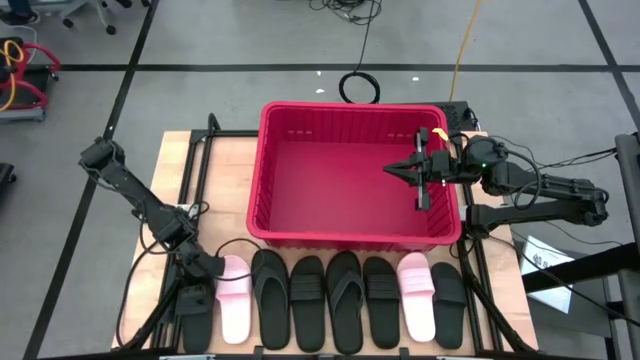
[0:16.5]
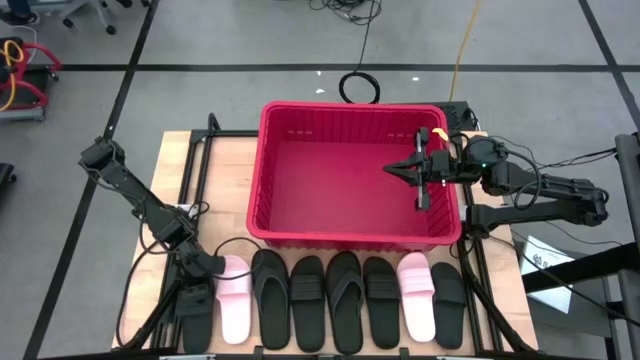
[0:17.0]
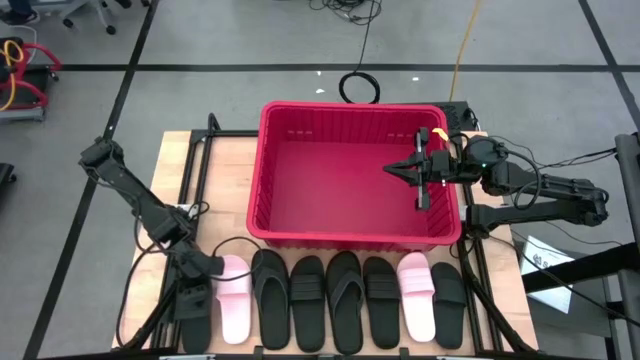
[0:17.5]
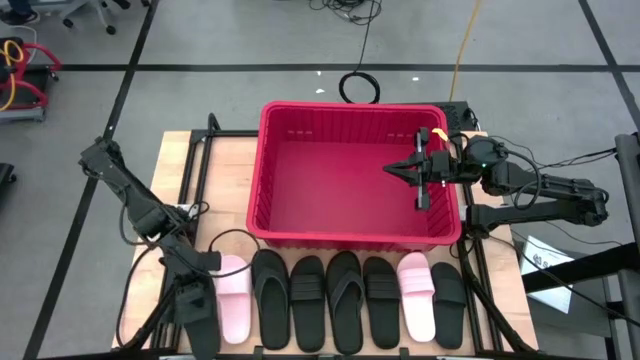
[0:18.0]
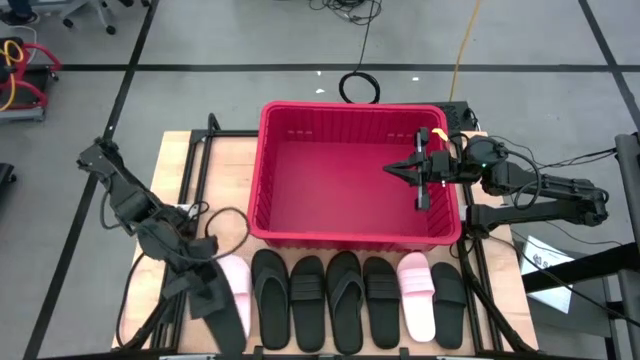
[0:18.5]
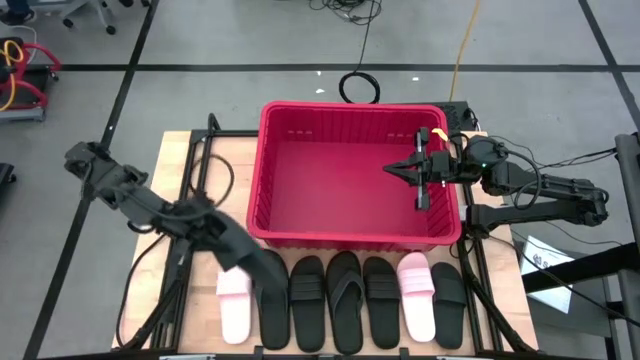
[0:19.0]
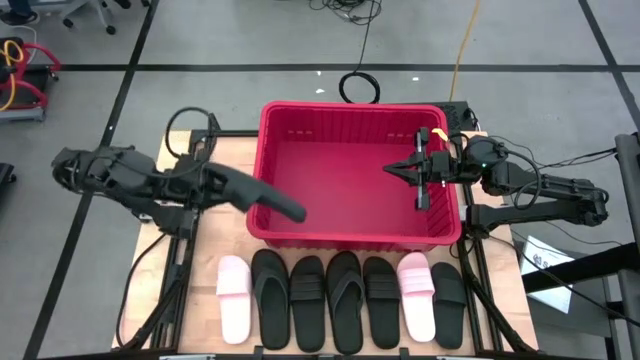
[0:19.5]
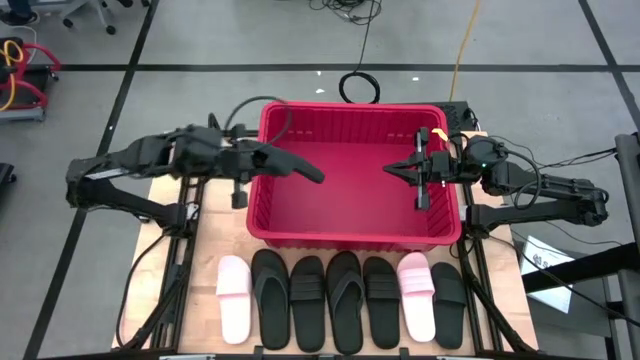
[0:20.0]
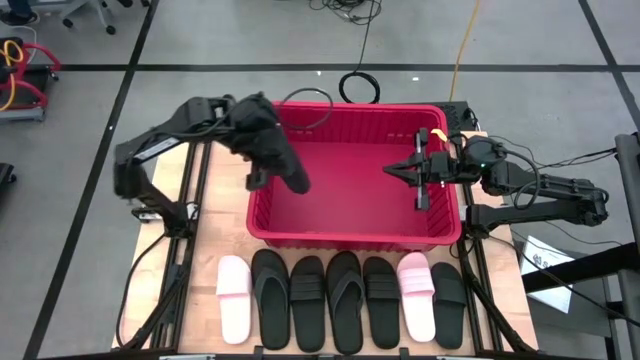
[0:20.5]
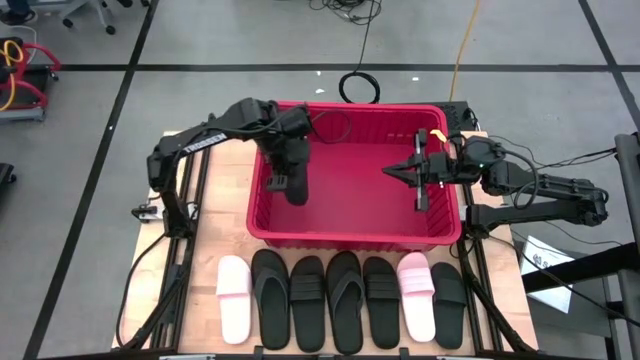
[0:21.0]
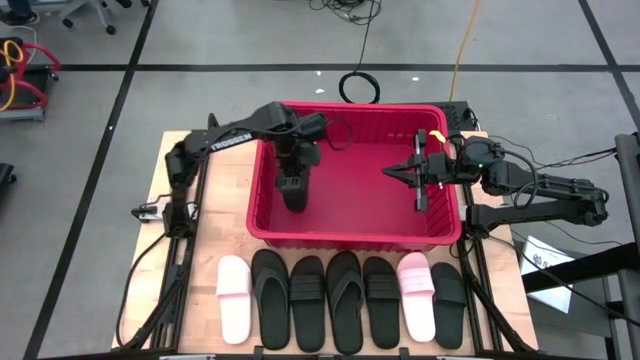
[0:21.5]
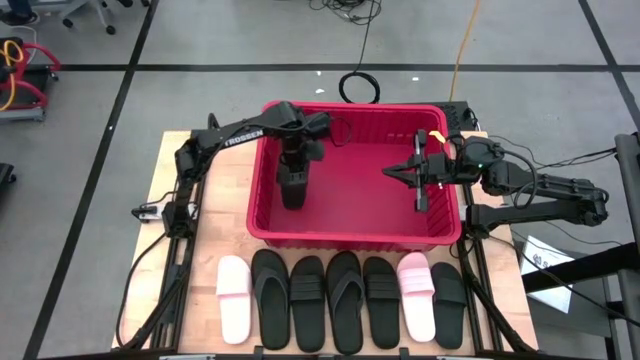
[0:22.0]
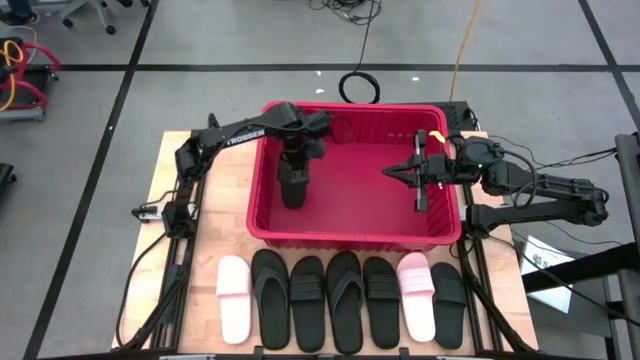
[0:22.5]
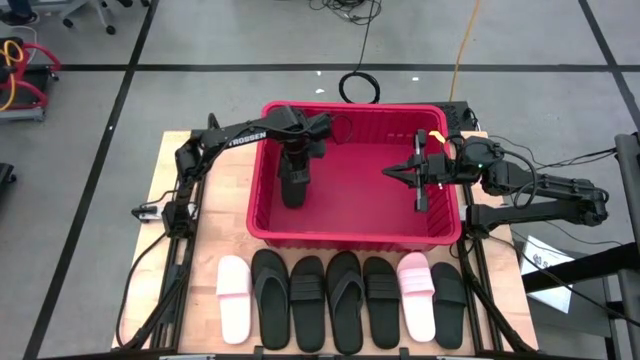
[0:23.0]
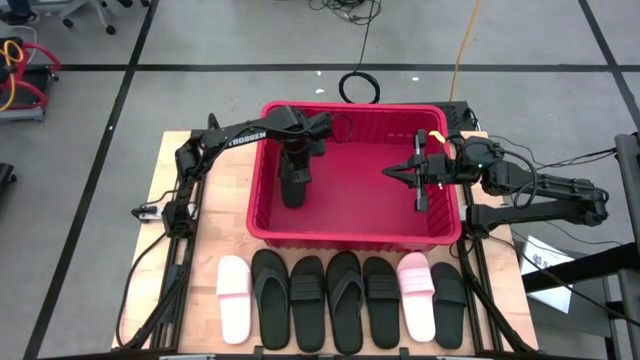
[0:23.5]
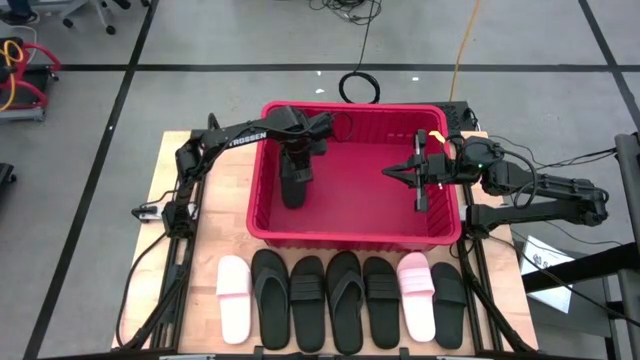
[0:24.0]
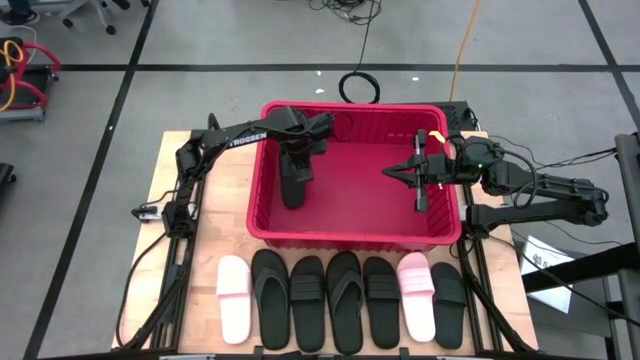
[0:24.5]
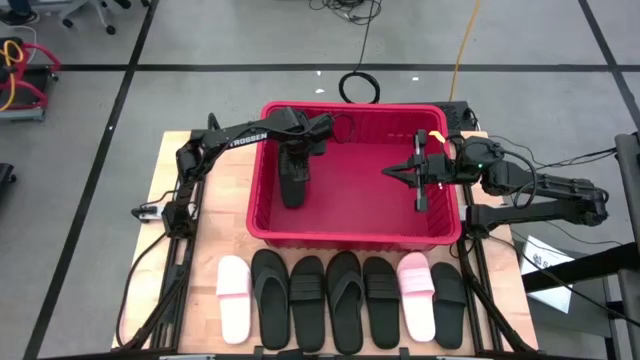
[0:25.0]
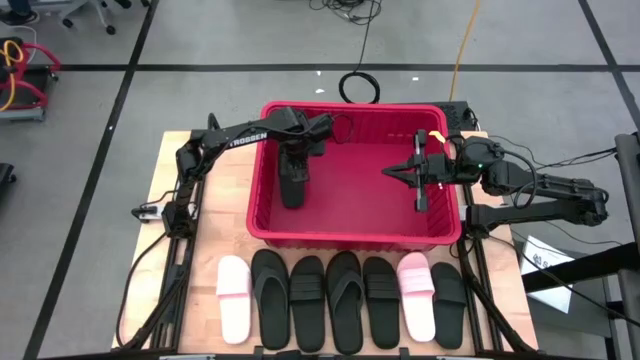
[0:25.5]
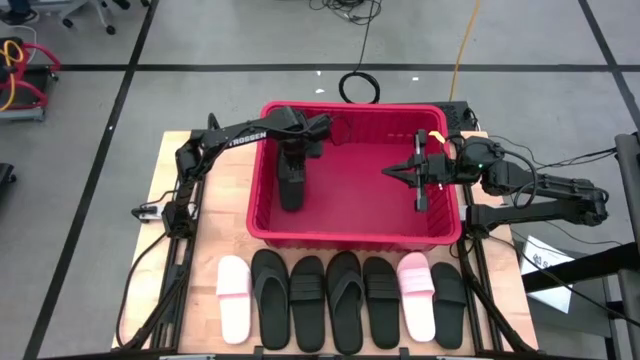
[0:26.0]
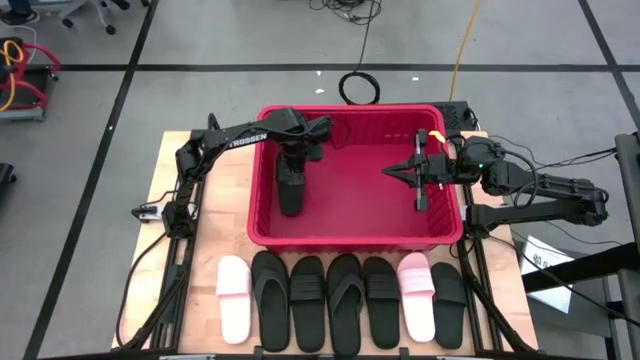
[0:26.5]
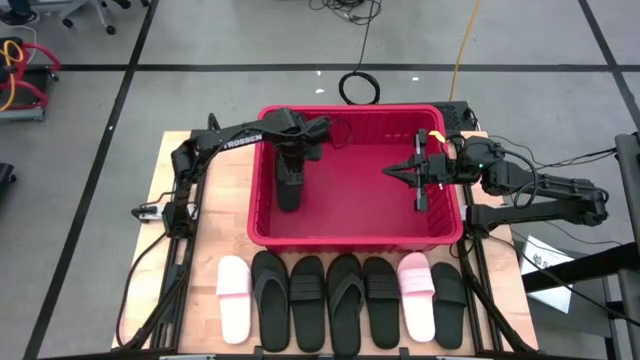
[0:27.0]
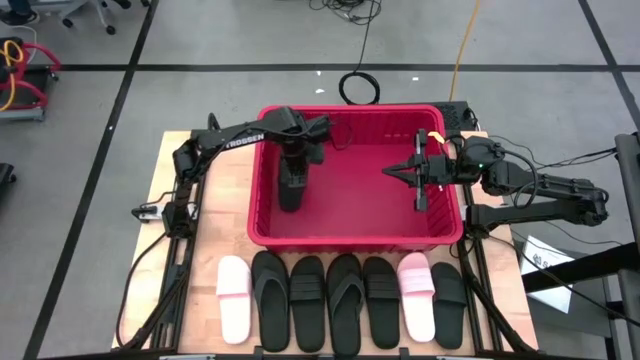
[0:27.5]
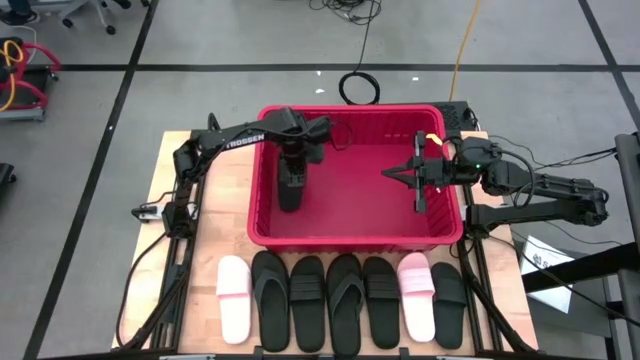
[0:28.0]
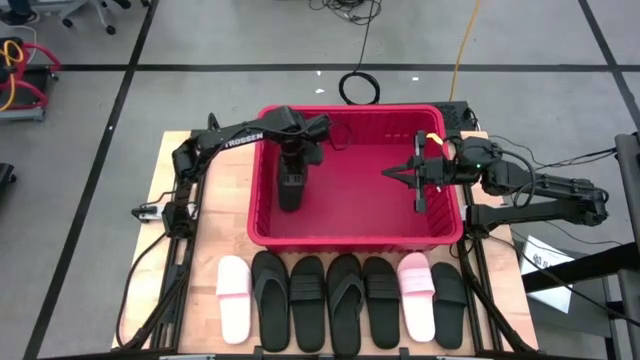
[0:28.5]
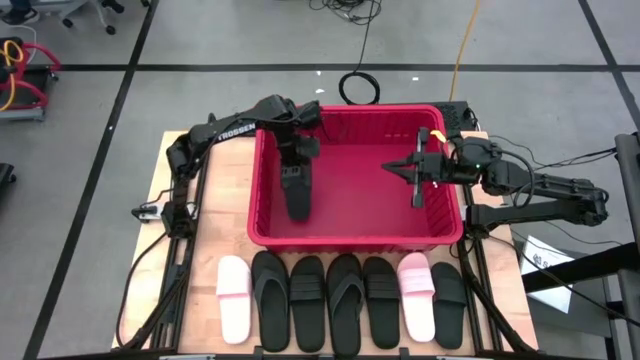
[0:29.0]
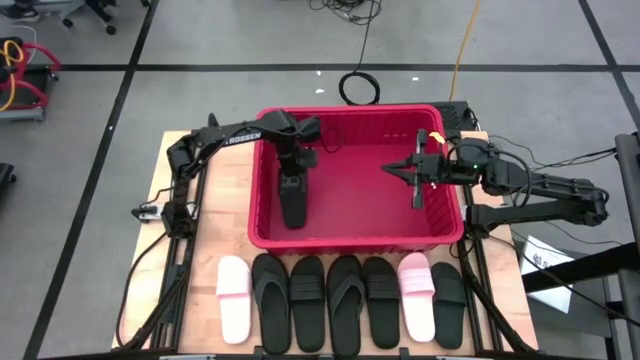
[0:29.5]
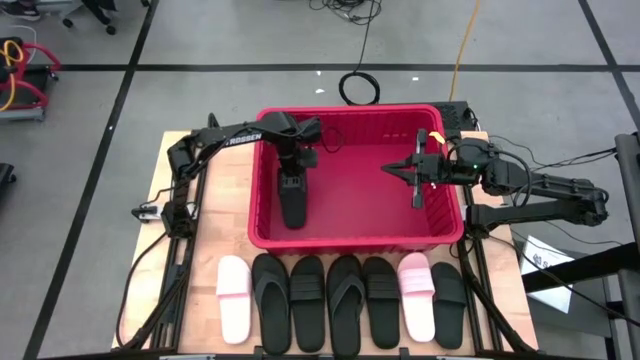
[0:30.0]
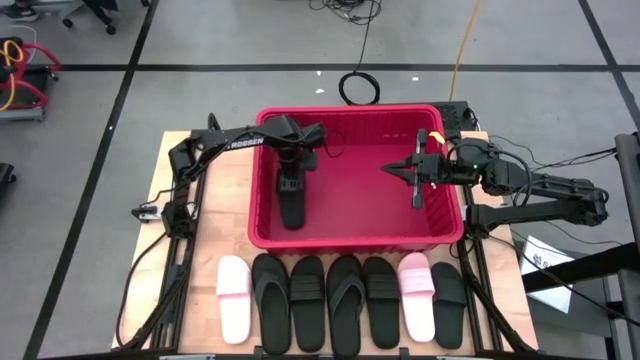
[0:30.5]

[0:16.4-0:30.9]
Task: Pick and place slides into bin
Put the black slide into the red bin

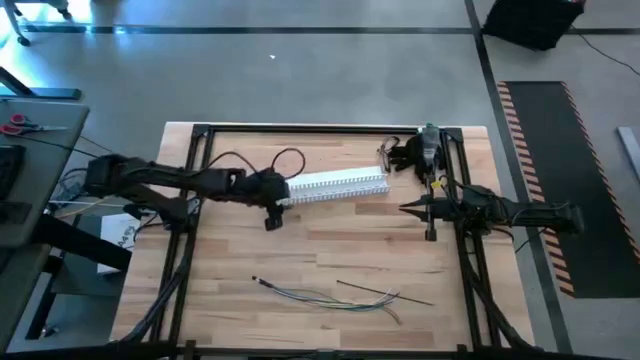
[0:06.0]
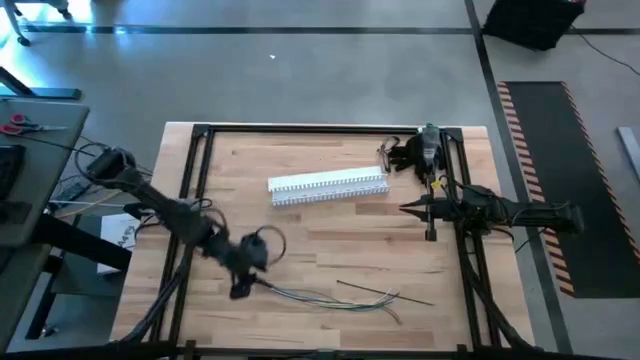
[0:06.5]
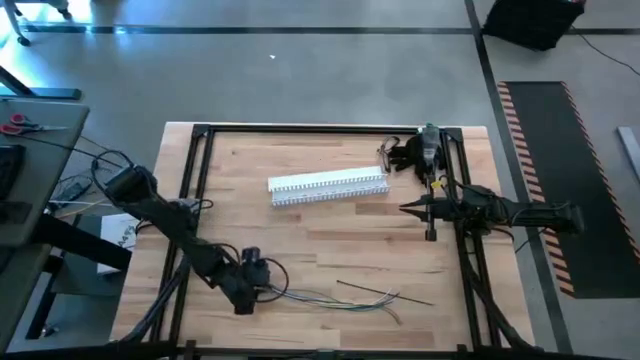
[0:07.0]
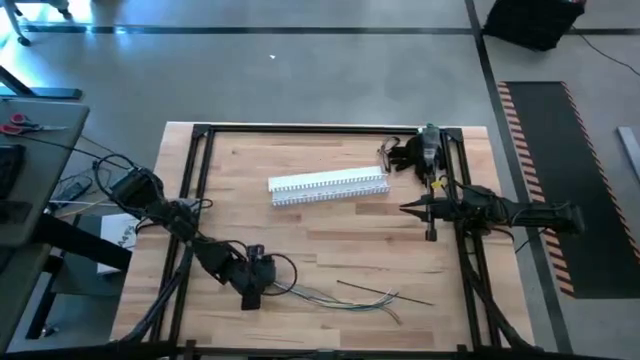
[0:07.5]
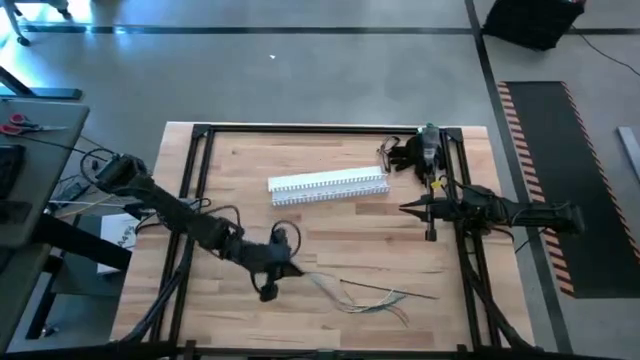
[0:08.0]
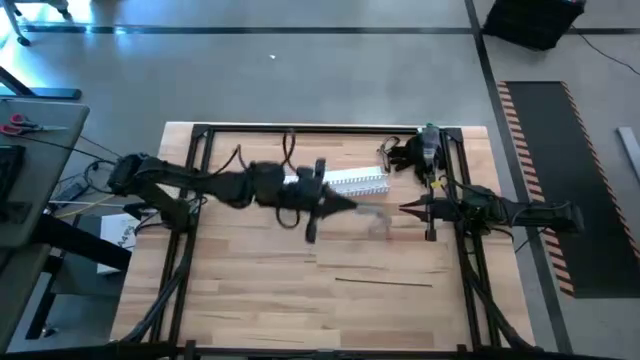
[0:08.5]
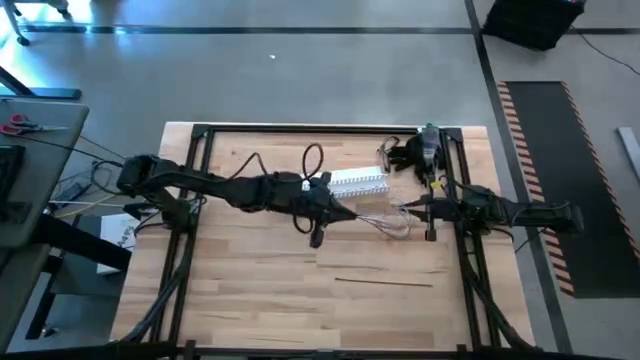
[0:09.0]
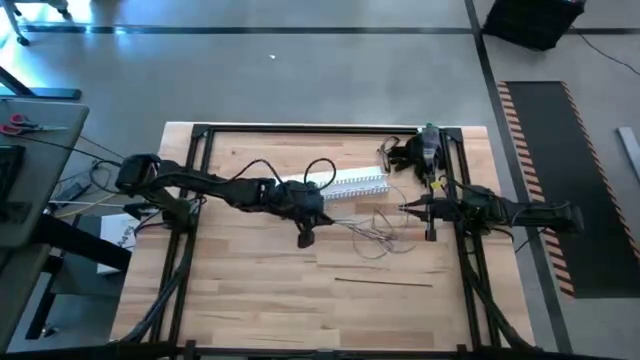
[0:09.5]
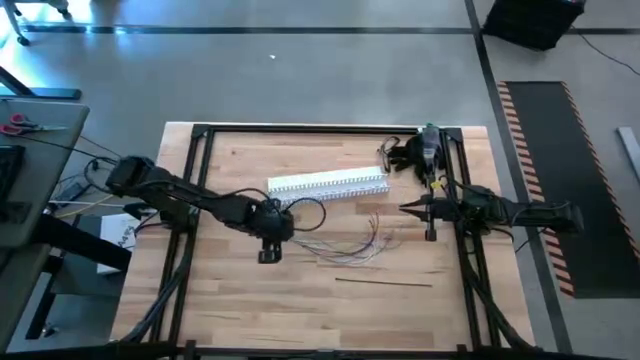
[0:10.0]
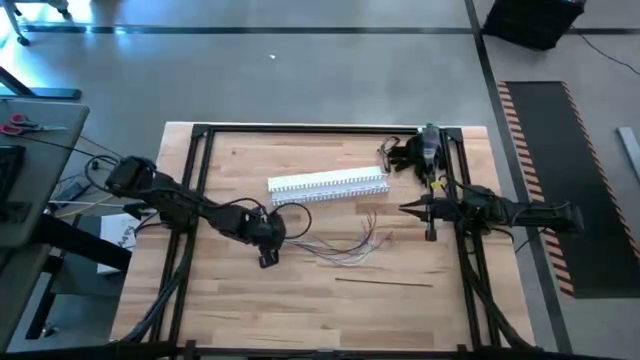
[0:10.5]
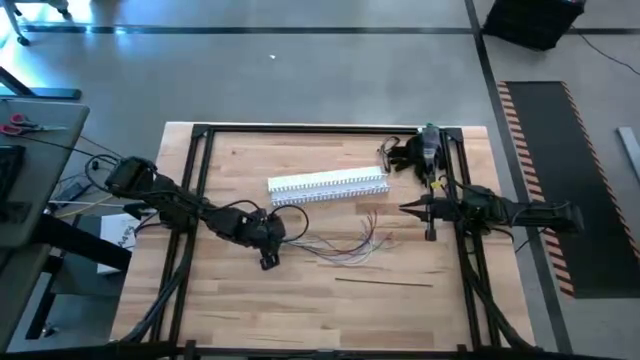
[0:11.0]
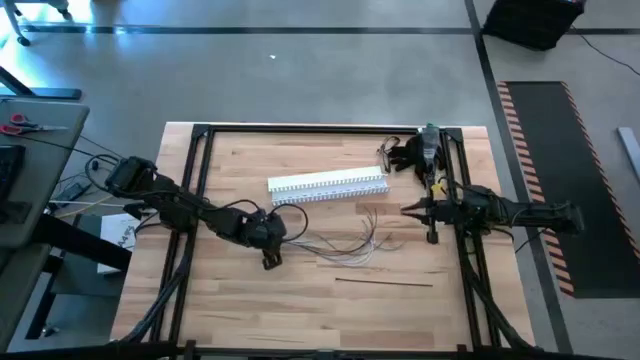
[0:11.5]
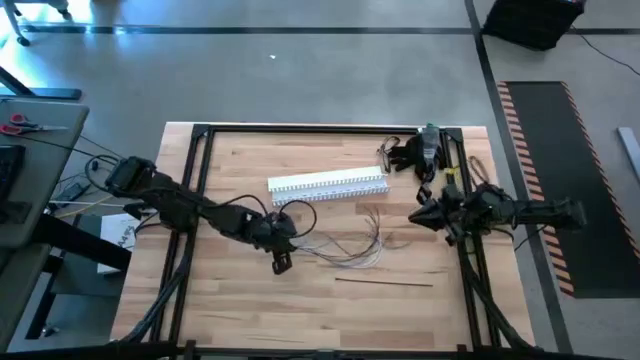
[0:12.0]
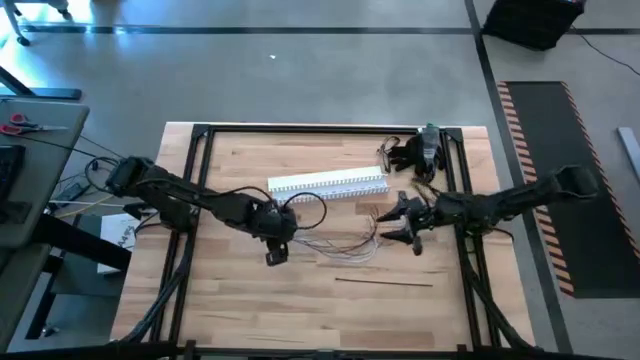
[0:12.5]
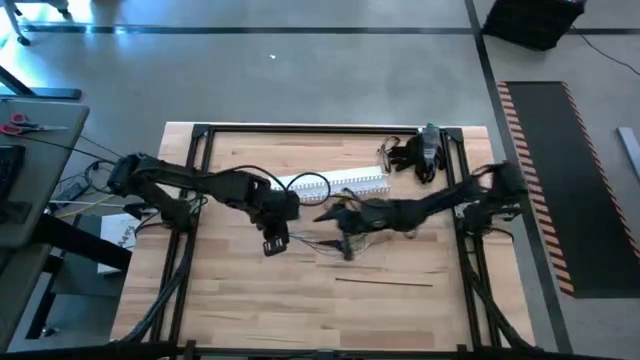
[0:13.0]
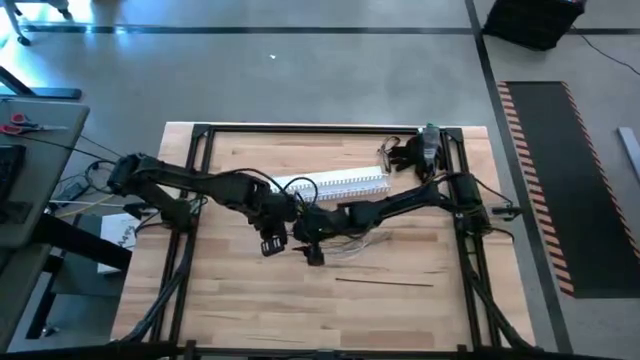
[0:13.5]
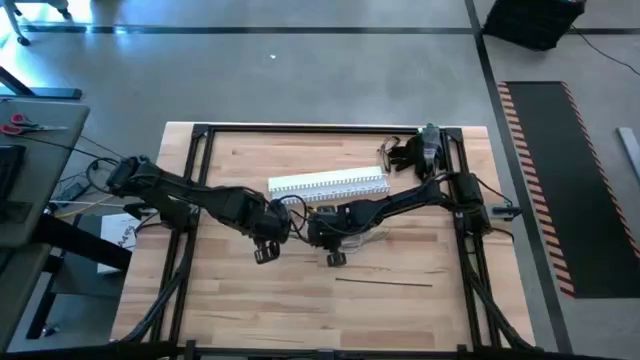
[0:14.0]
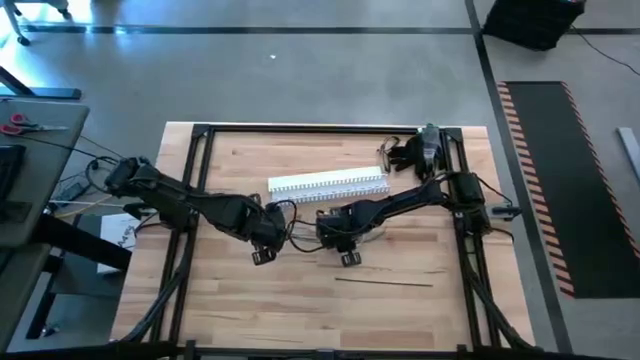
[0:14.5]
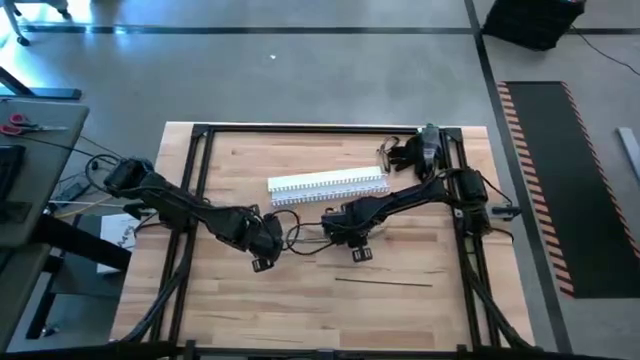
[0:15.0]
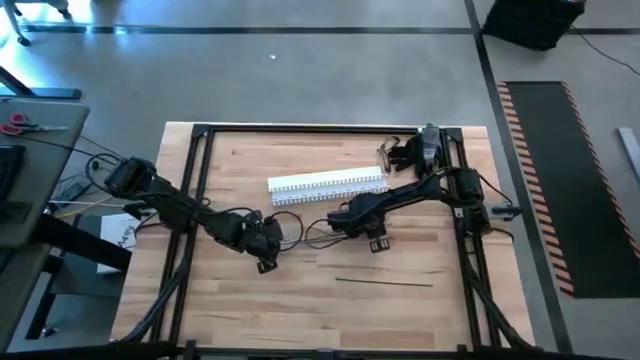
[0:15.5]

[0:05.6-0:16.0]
Task: Ziptie cables
Move the cable wires to the center of the table
